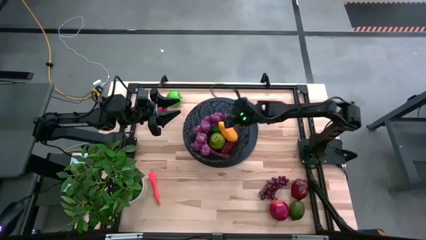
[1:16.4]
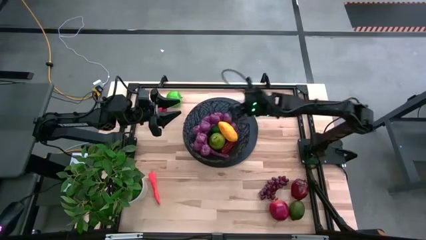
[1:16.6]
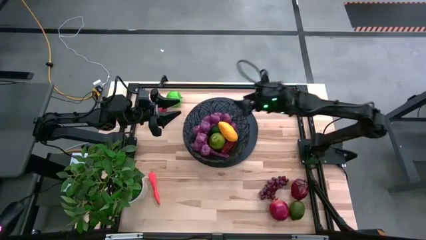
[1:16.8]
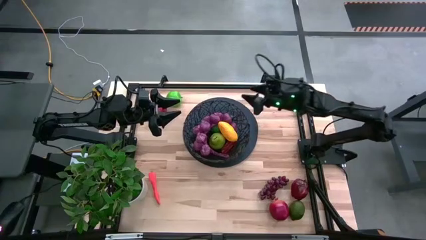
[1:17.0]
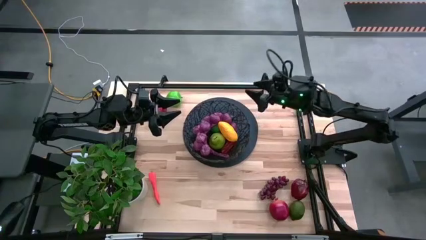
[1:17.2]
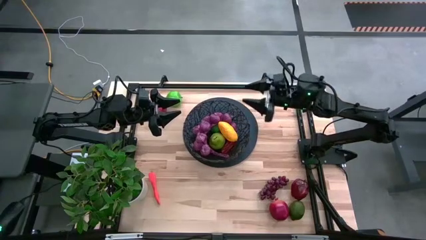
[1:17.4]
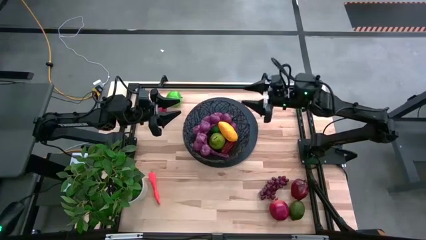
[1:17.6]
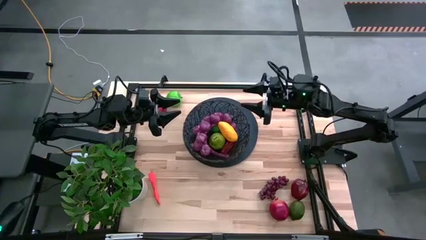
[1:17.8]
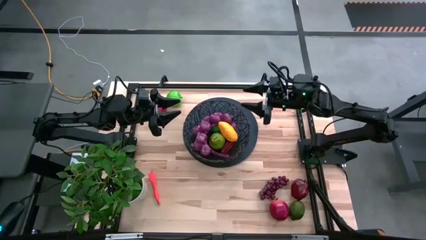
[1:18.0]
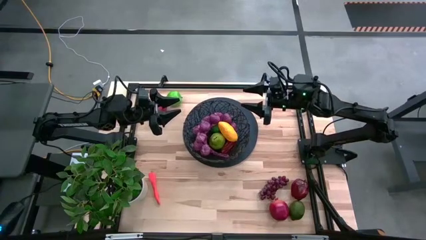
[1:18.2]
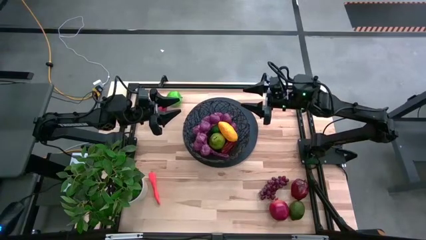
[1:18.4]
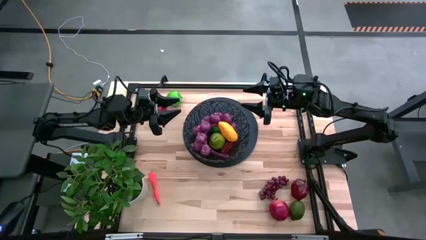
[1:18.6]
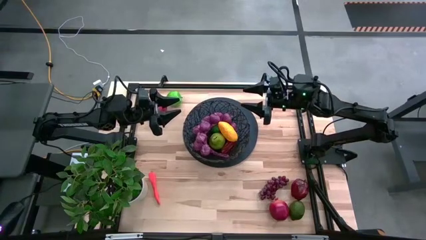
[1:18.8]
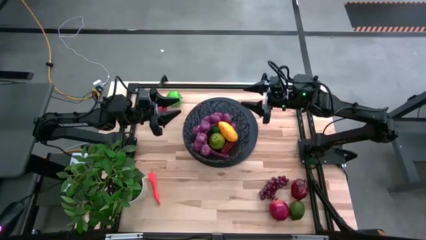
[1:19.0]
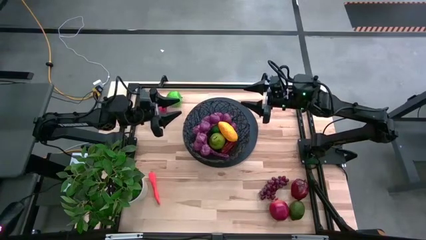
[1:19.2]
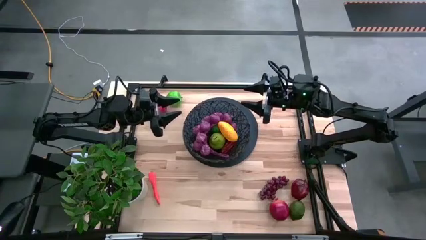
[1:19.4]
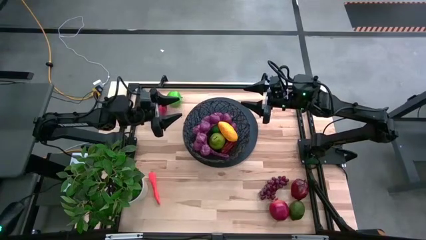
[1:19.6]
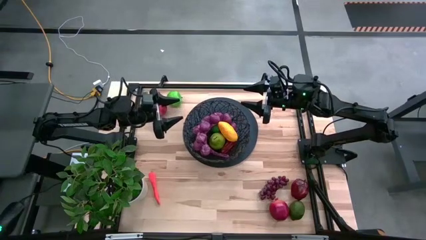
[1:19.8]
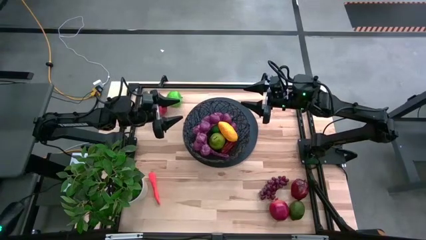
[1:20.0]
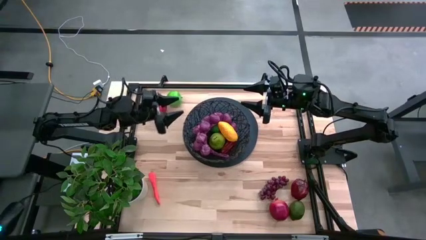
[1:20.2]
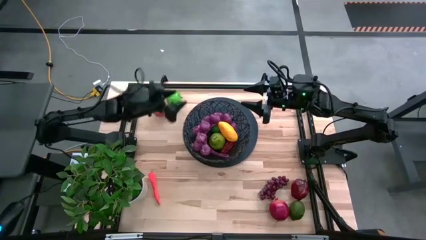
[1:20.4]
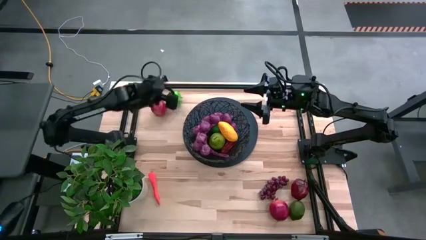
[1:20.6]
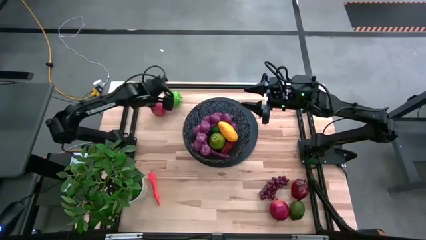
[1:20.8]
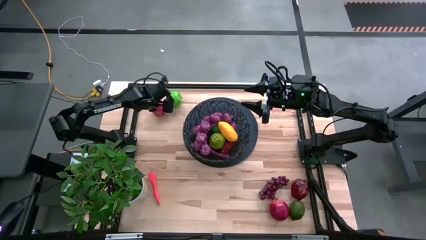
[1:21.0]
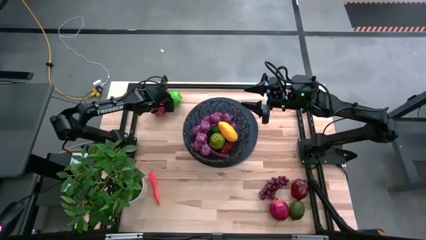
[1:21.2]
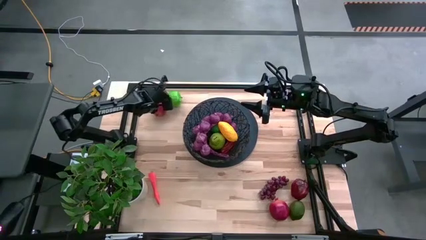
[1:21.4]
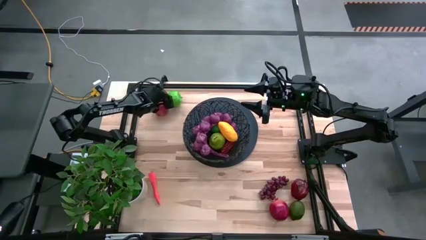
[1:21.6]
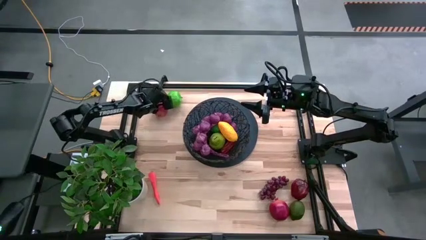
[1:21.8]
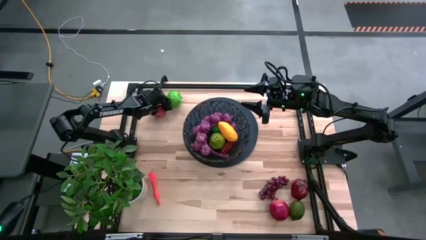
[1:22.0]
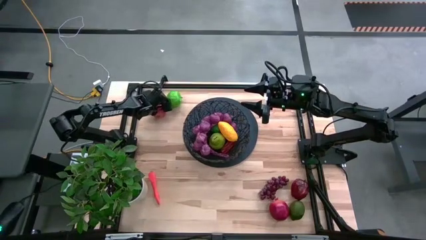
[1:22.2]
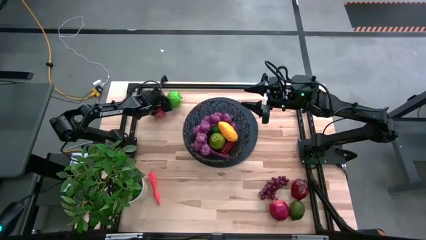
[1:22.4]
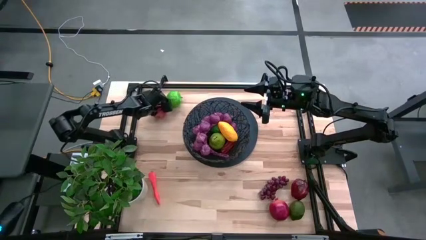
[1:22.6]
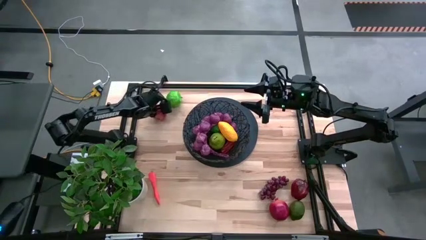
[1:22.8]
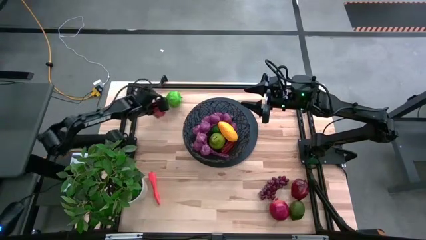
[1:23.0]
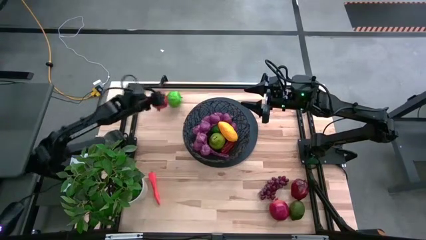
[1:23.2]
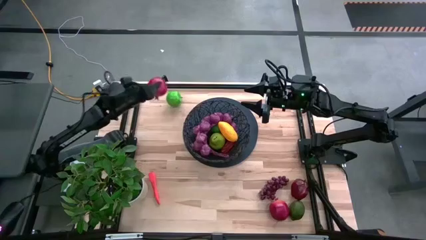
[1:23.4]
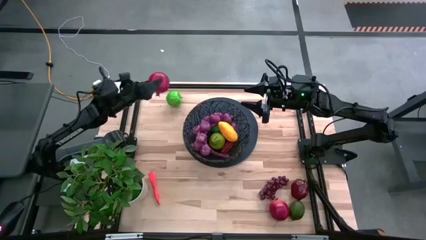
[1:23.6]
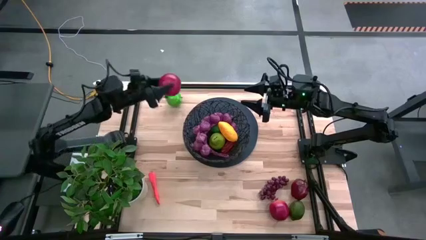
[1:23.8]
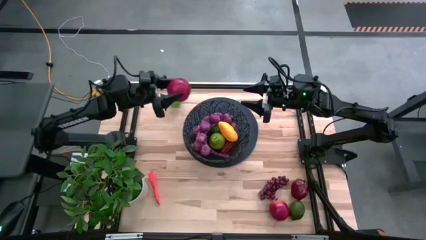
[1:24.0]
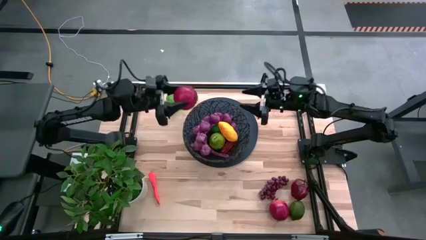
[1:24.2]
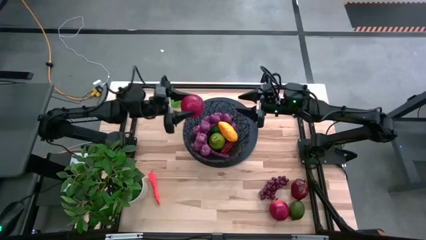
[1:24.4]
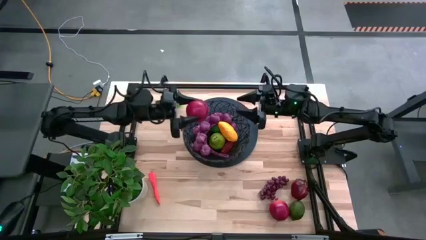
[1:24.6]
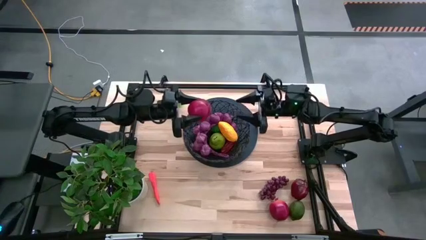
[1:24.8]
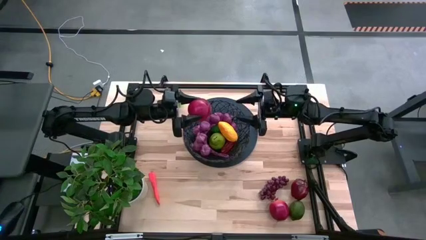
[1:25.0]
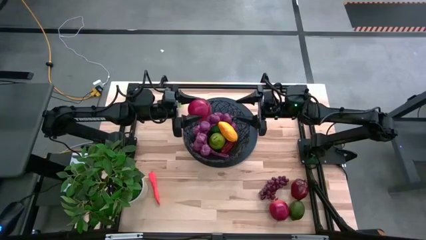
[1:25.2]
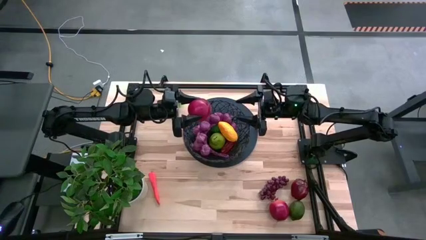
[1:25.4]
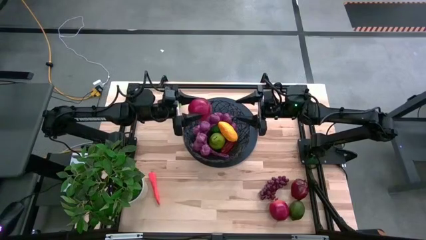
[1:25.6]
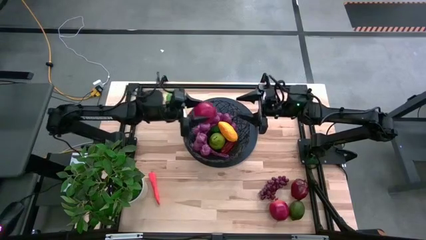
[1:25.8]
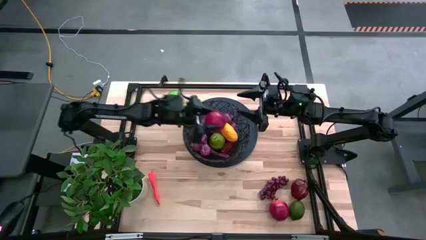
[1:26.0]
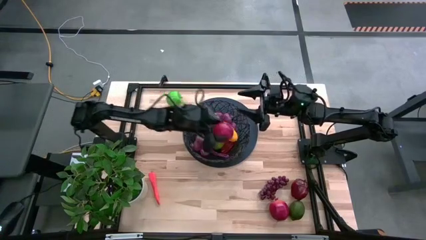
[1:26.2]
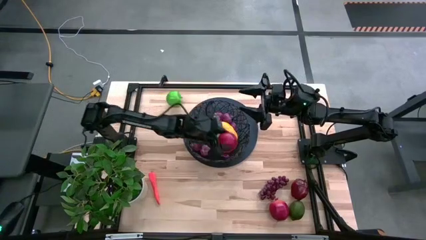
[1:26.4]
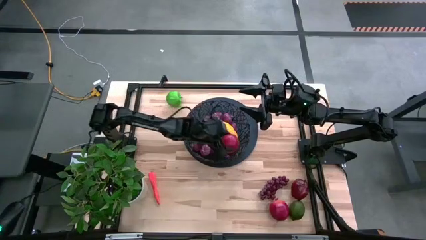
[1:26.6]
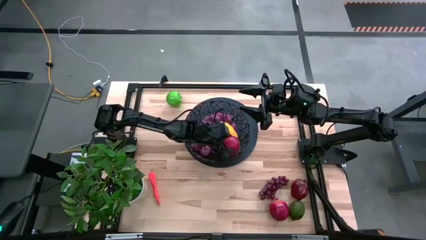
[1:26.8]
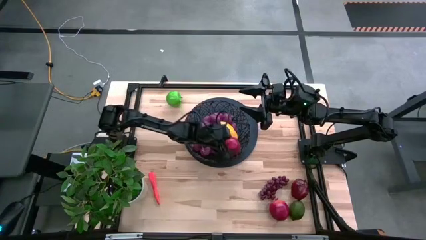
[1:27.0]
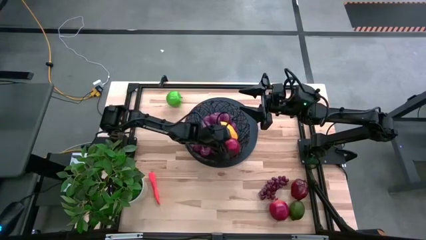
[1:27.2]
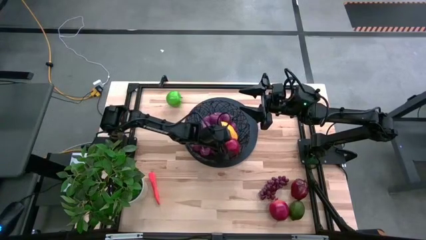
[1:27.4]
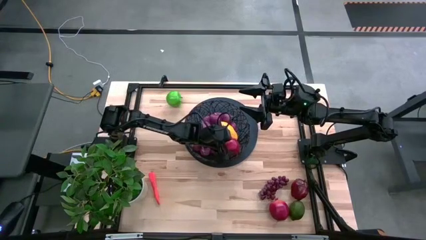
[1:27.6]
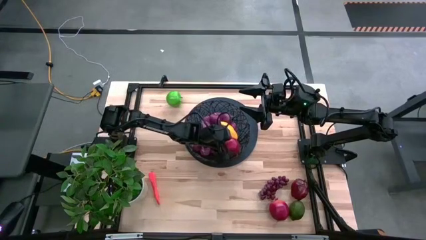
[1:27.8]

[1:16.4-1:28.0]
Task: Build produce basket
Put the top red pomegranate into basket
